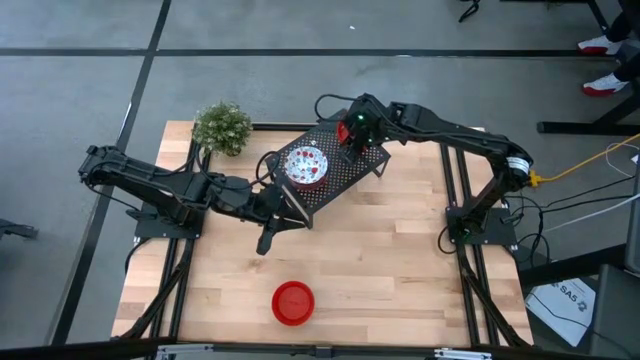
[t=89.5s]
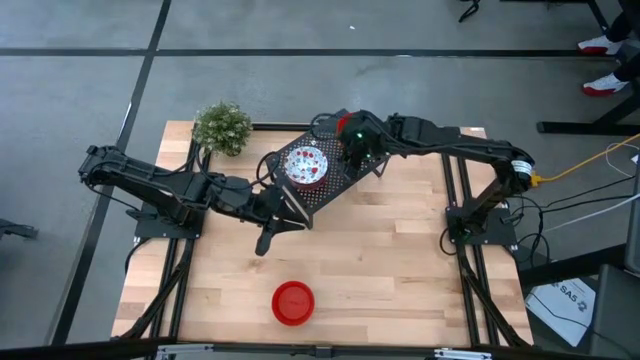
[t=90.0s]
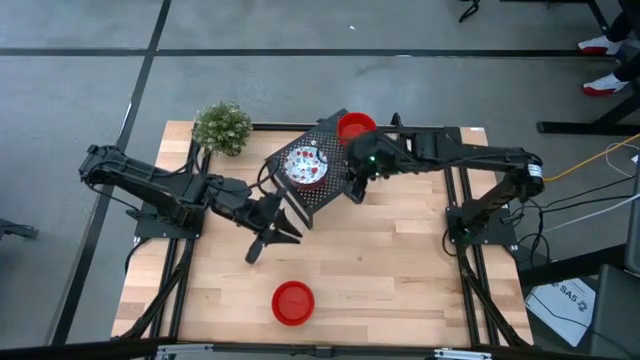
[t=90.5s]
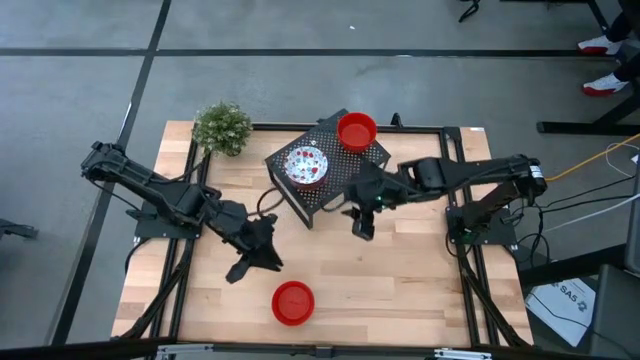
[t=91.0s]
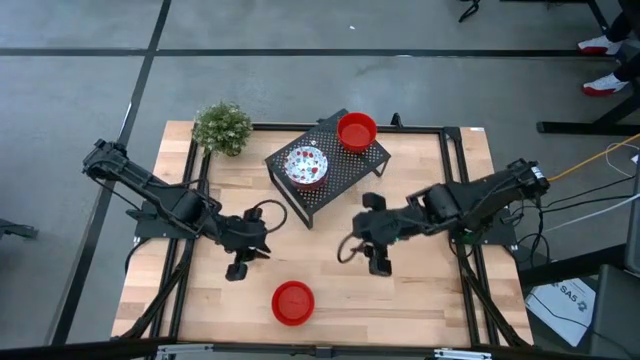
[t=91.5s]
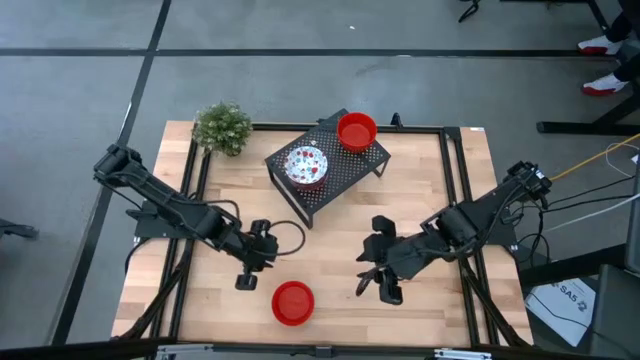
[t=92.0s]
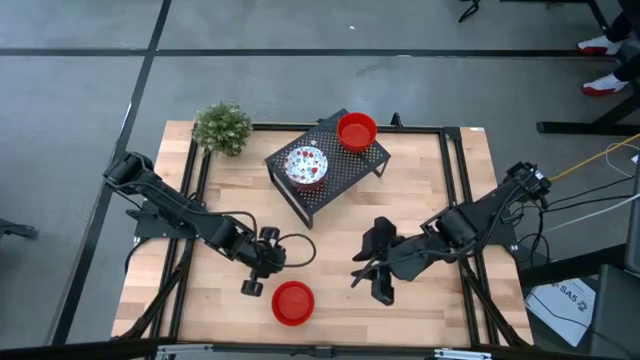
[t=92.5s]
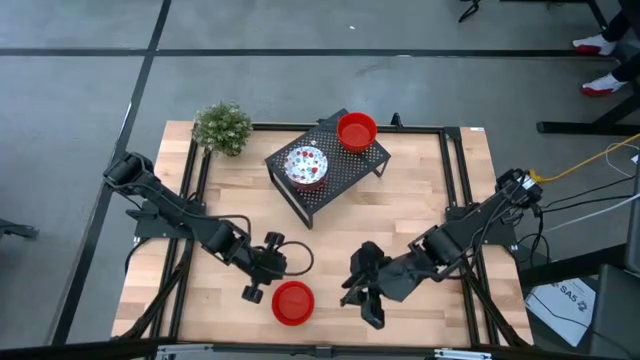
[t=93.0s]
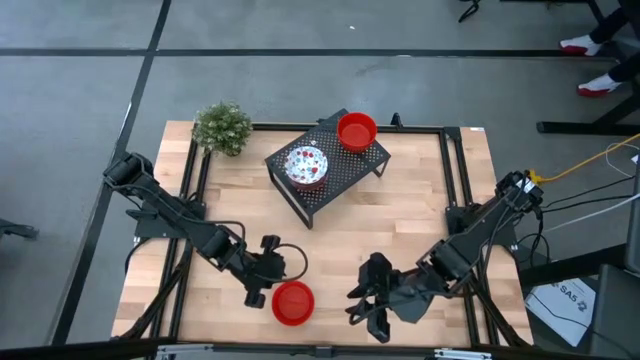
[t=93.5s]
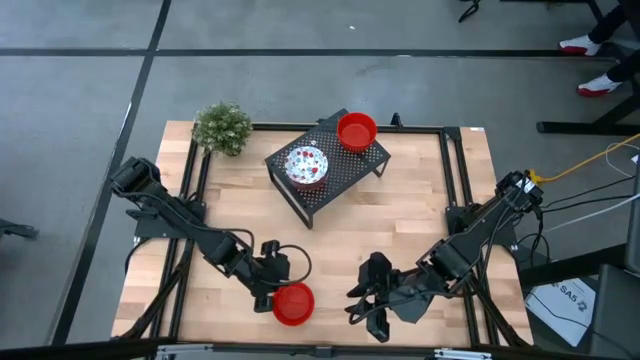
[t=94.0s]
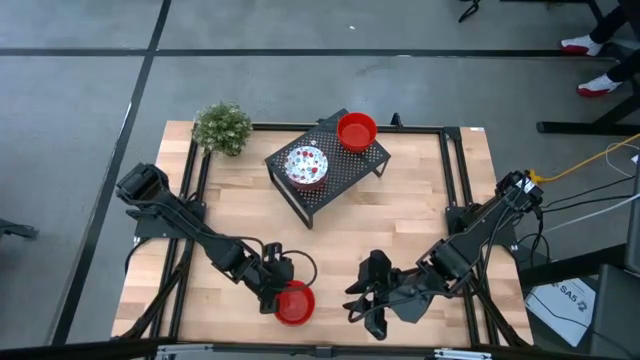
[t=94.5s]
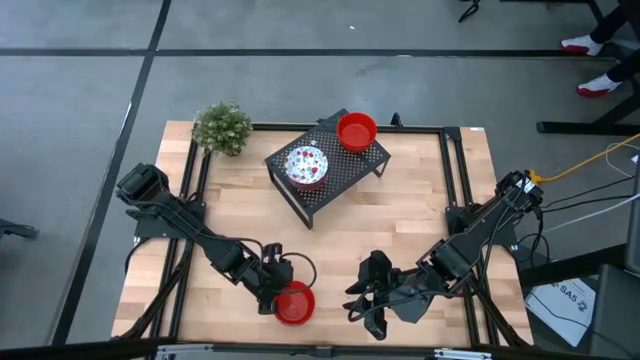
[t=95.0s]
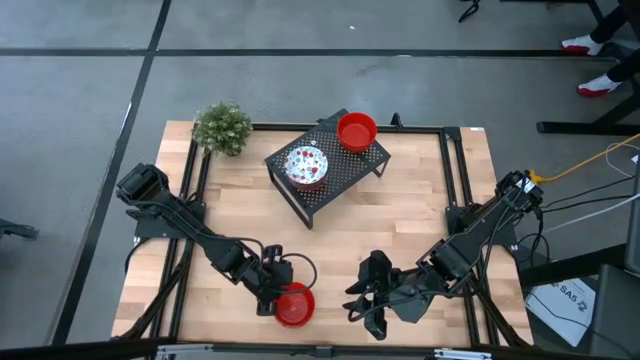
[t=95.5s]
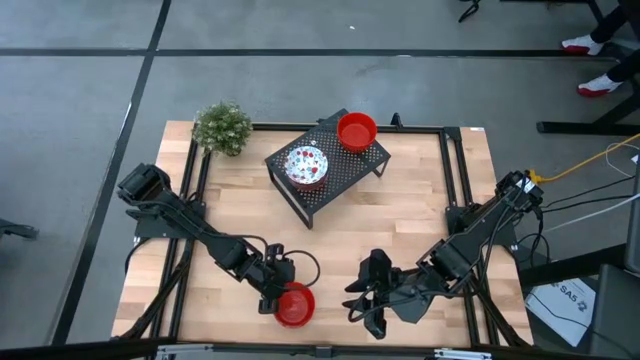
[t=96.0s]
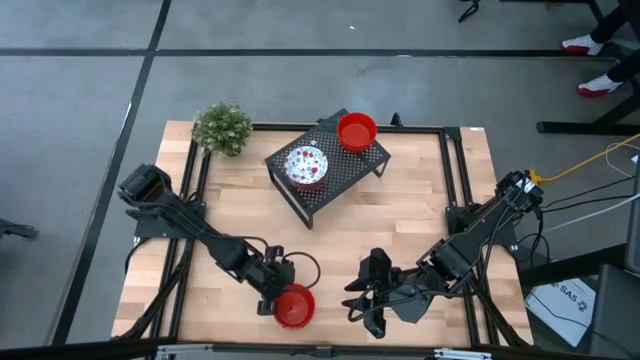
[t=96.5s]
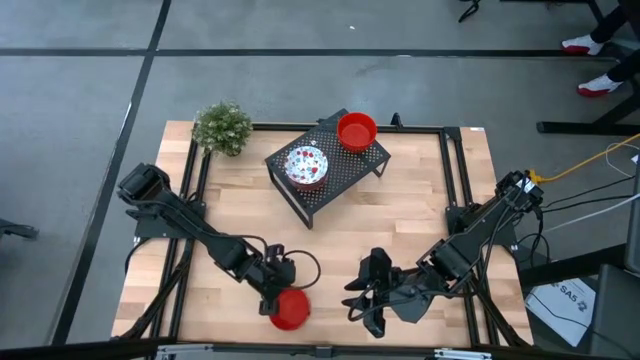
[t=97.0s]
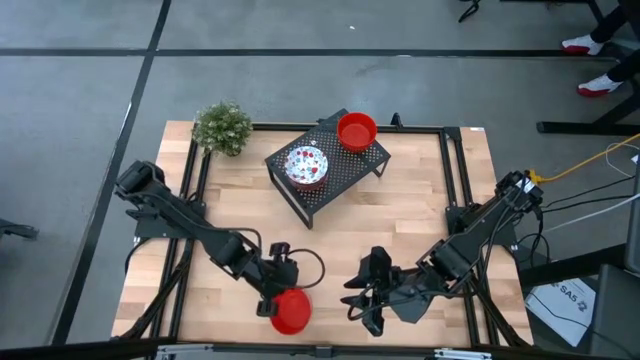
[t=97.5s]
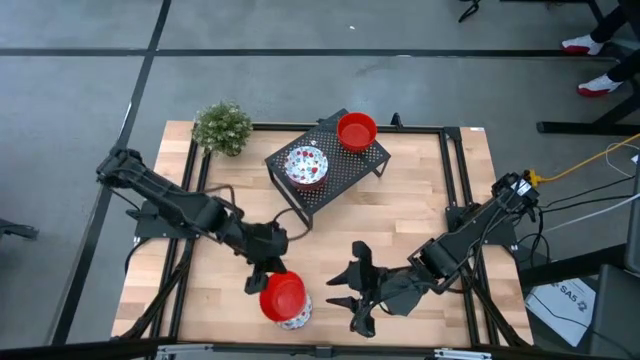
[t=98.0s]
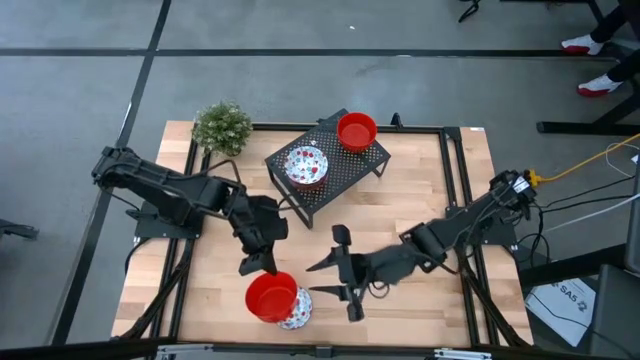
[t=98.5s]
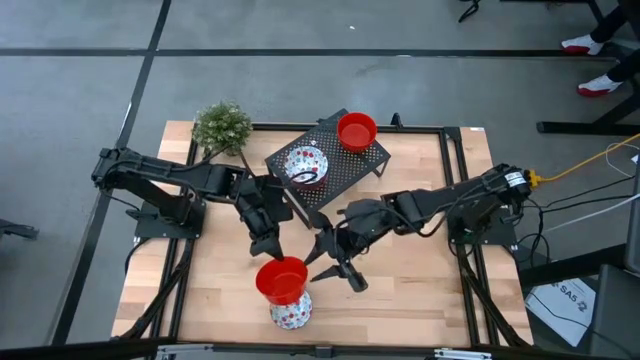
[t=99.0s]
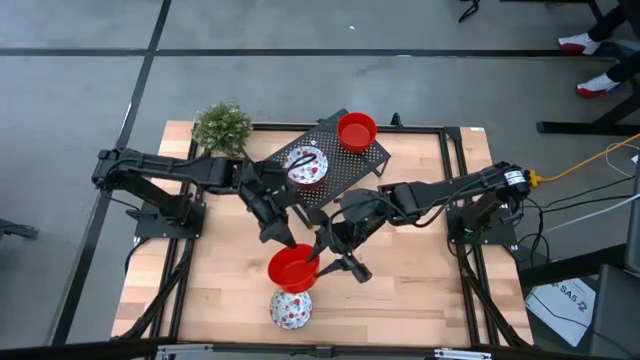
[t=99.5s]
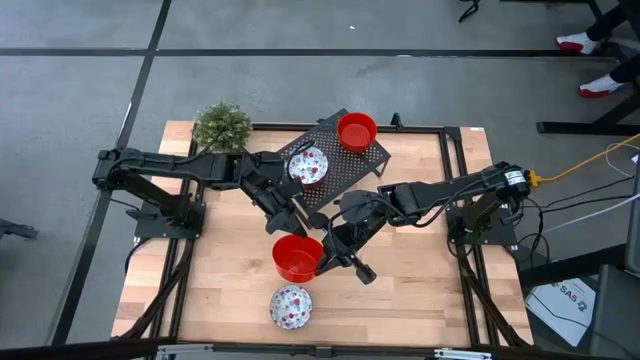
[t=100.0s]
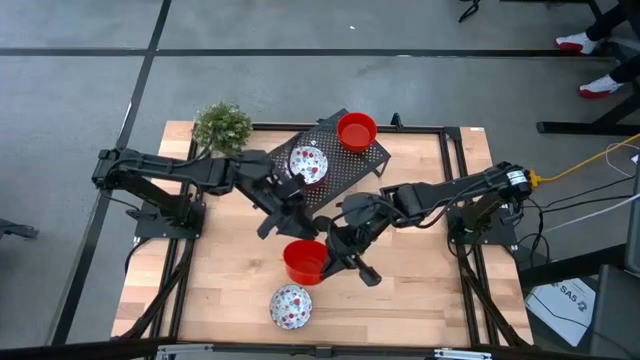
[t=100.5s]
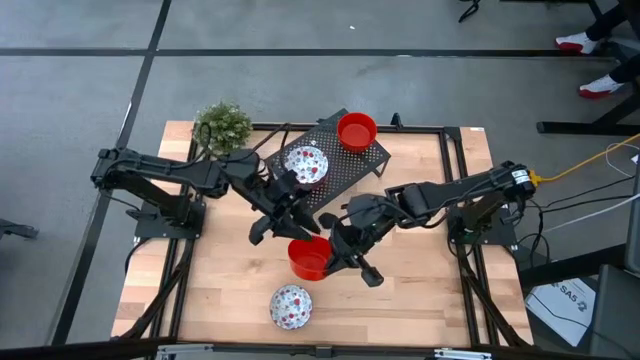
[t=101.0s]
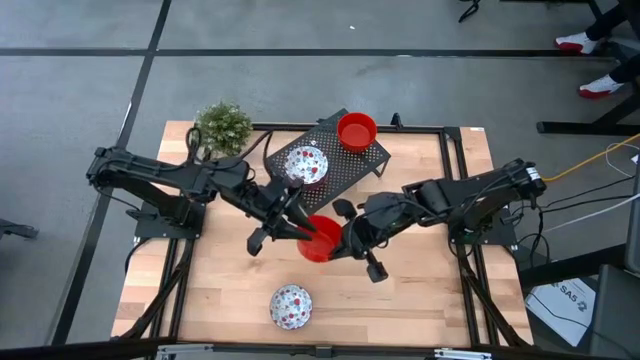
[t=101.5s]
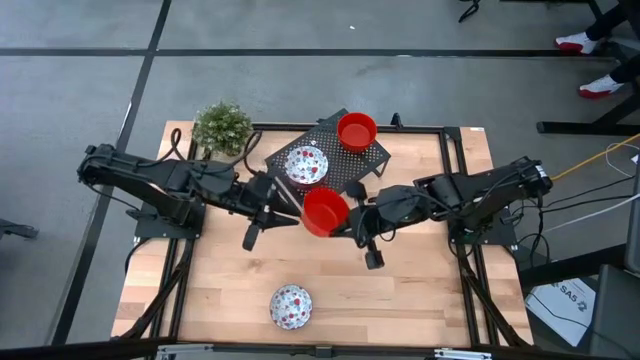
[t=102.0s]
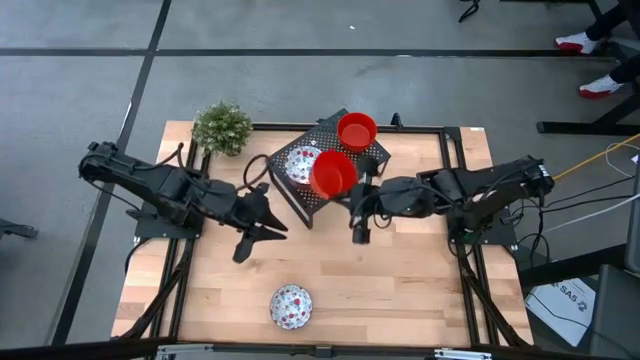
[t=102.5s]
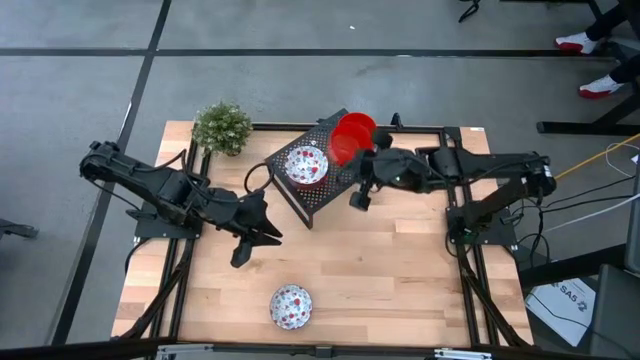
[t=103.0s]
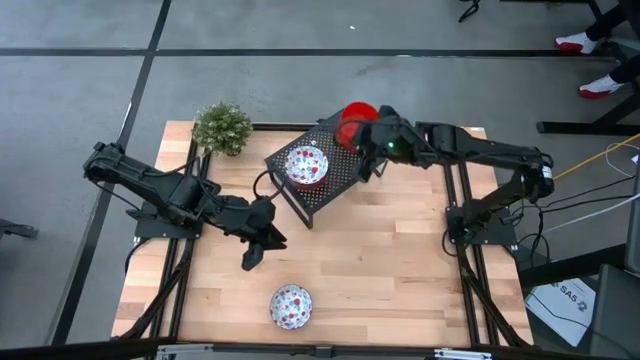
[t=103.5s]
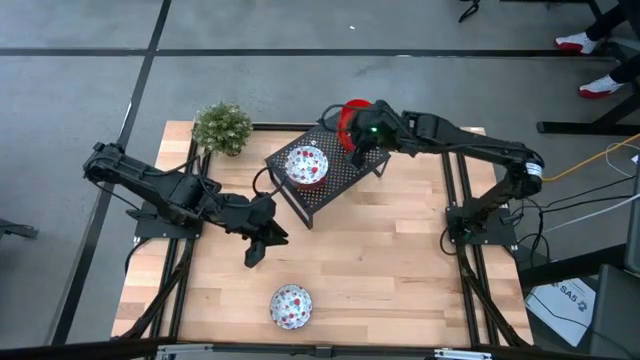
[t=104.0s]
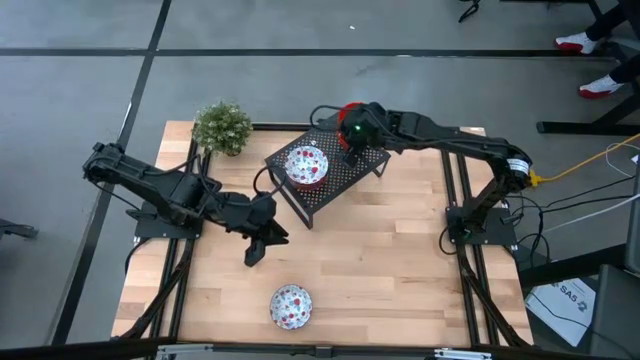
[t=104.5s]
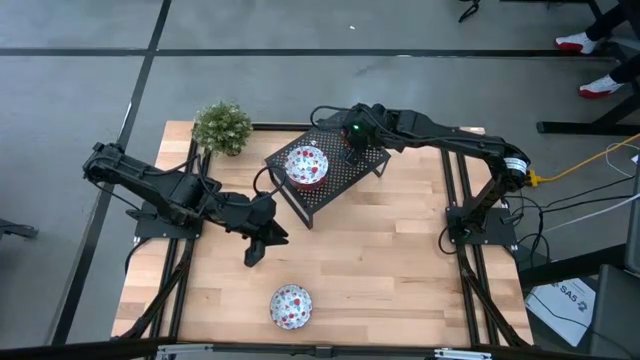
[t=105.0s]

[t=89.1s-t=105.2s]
Task: Pick & Place Mini bowls
Stack the red bowl on the red bowl on the shelf

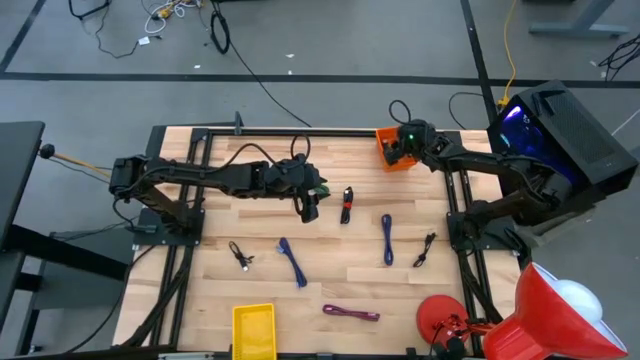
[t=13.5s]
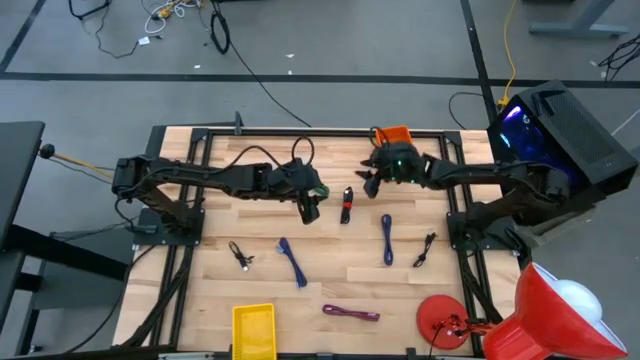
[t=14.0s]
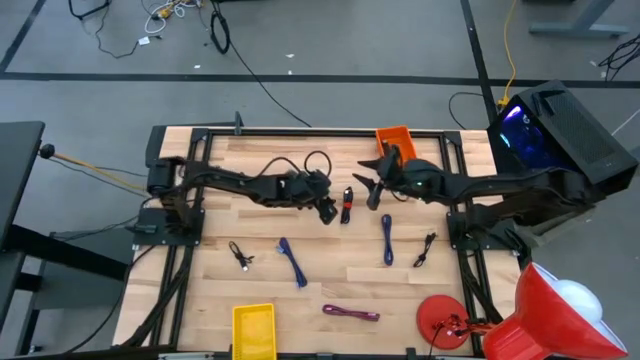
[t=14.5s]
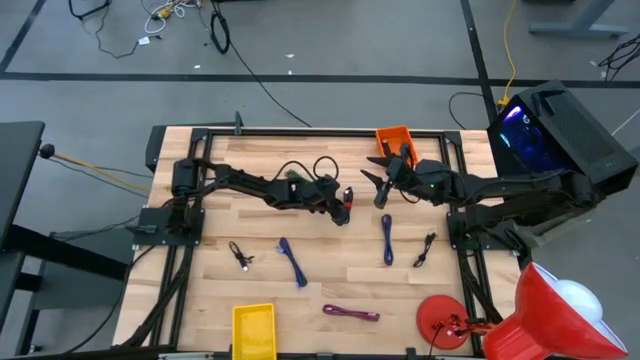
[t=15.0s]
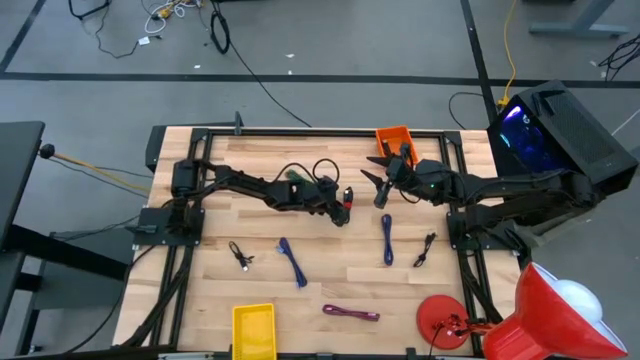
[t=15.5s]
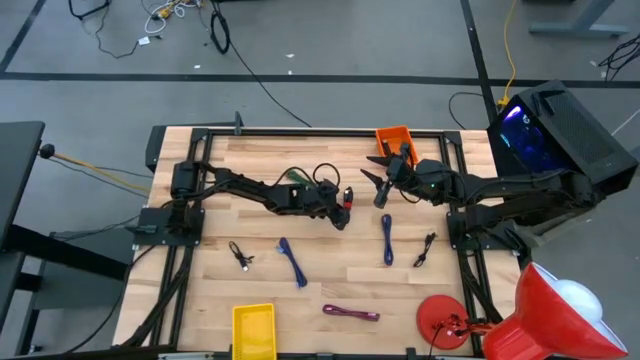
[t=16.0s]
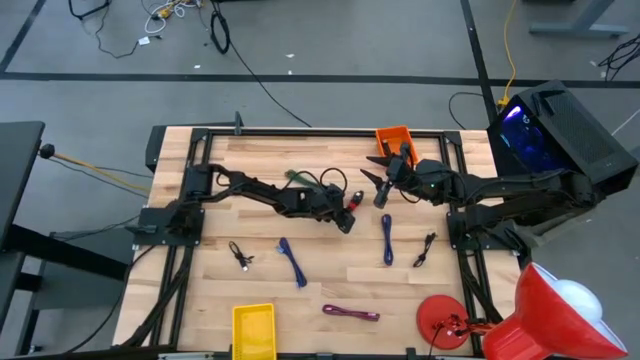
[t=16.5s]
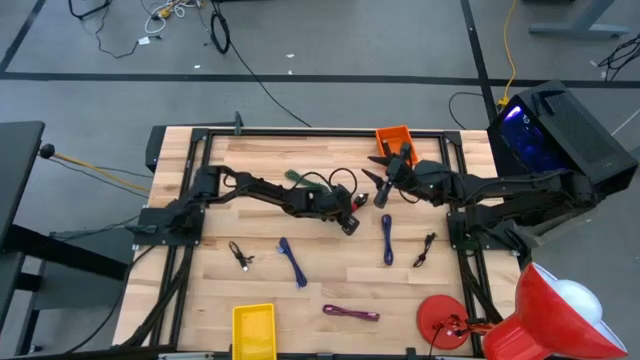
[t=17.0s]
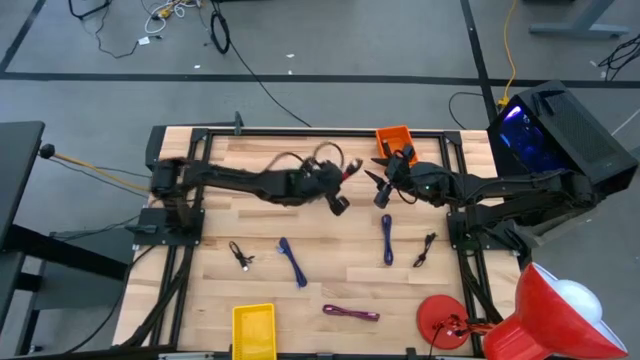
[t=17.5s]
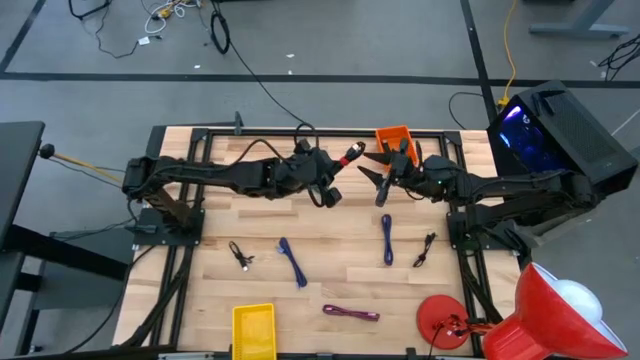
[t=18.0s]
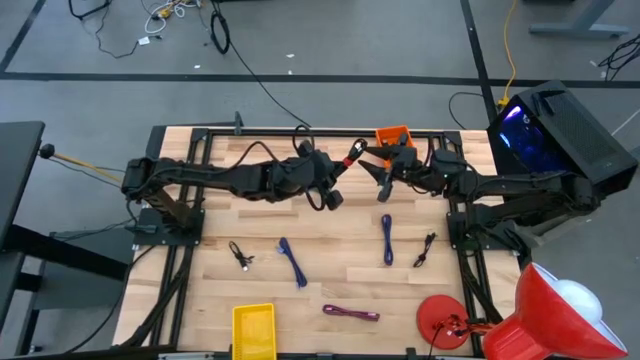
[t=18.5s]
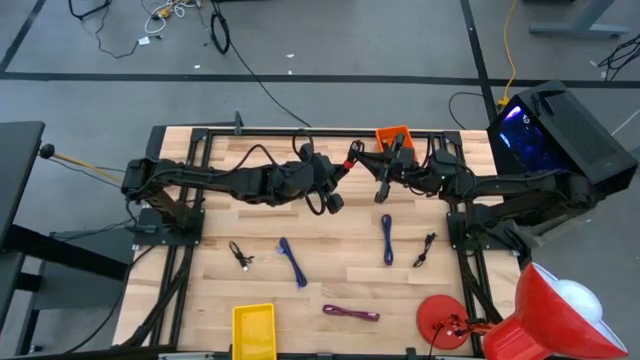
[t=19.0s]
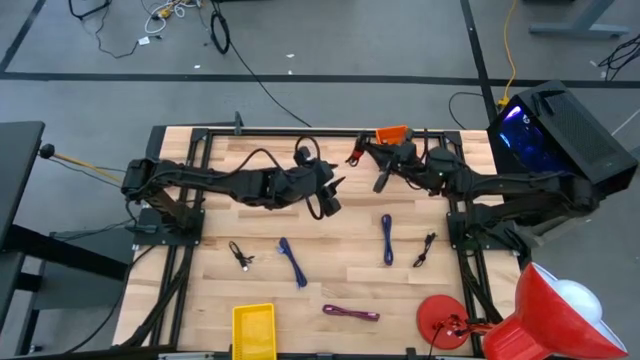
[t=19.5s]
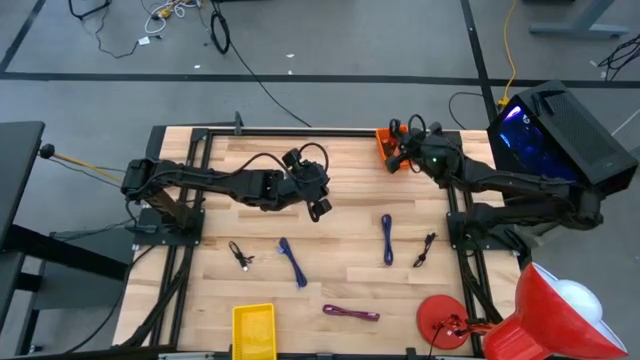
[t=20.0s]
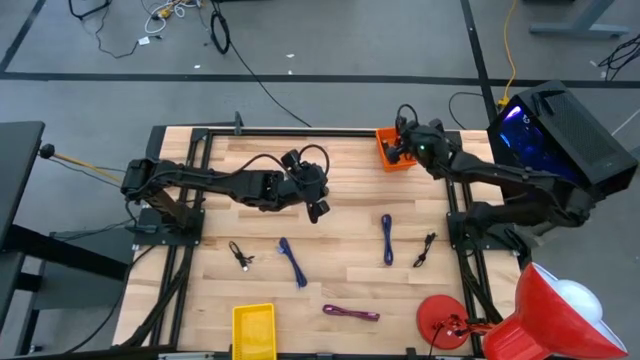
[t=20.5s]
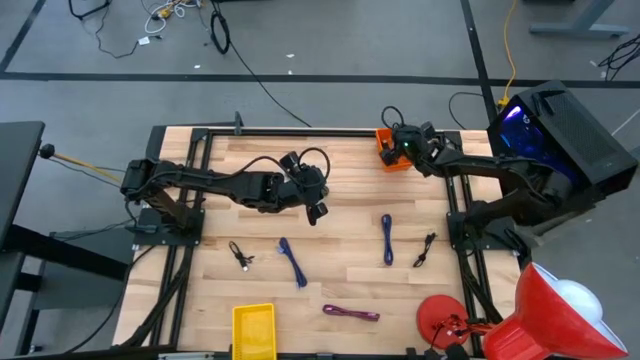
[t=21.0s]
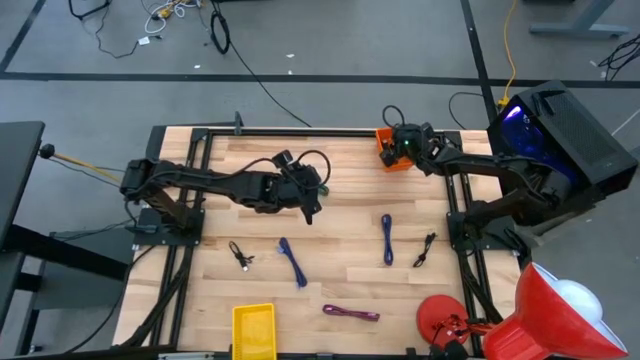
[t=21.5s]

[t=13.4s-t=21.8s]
Task: Pick & Place USB Port
Put the black charger cable into the orange bin
